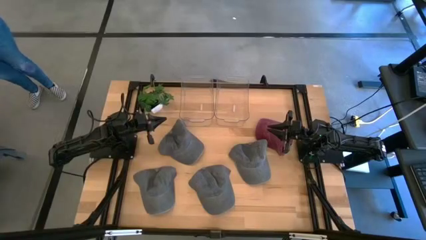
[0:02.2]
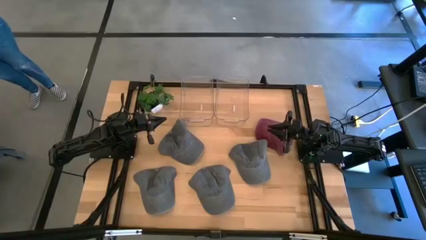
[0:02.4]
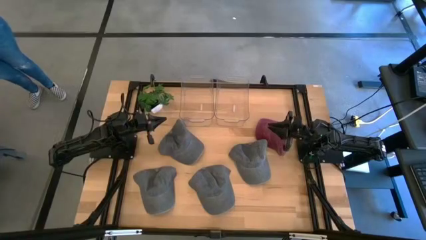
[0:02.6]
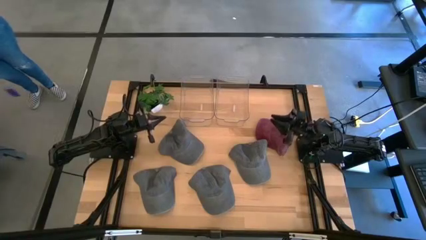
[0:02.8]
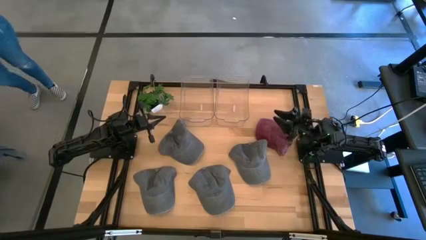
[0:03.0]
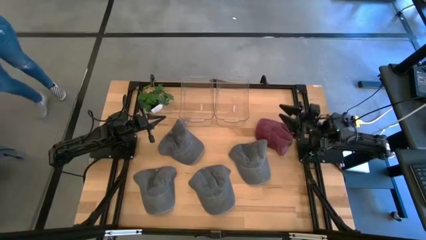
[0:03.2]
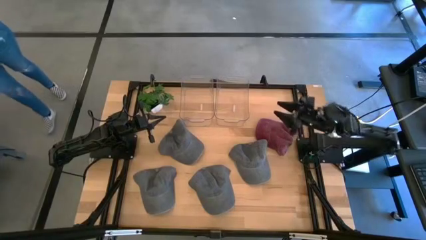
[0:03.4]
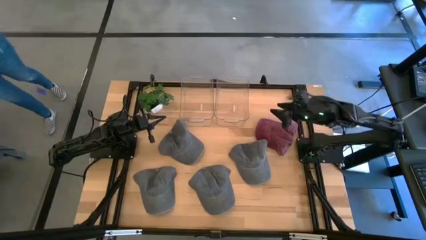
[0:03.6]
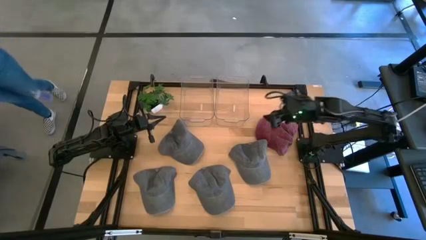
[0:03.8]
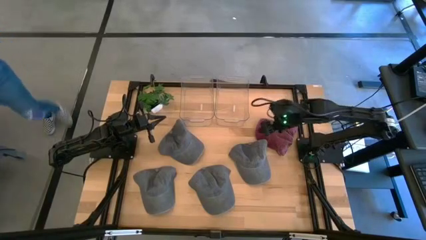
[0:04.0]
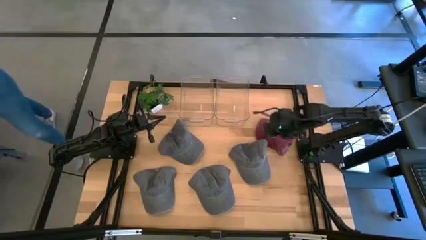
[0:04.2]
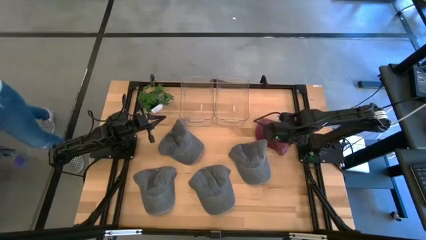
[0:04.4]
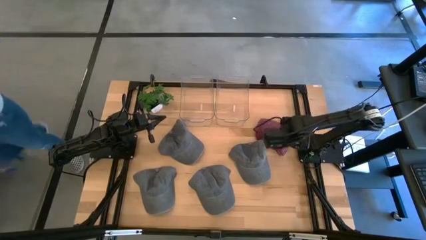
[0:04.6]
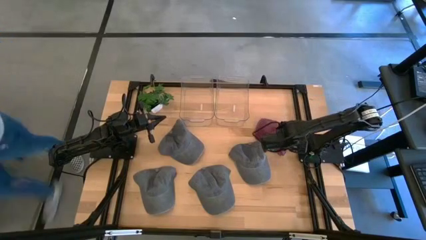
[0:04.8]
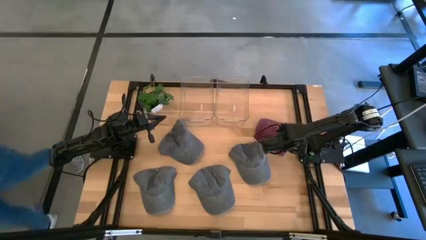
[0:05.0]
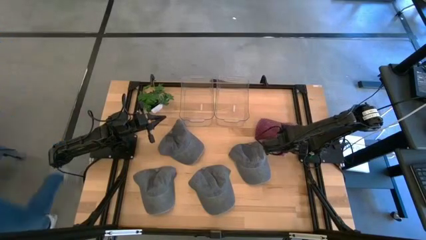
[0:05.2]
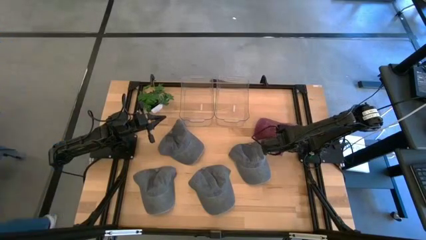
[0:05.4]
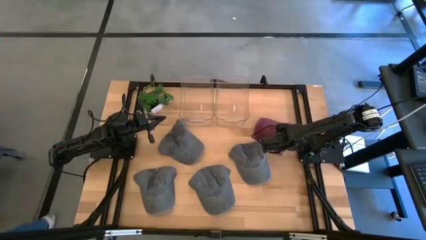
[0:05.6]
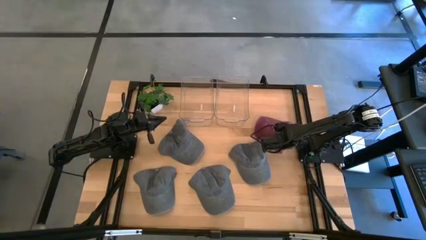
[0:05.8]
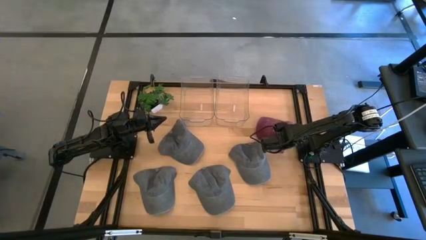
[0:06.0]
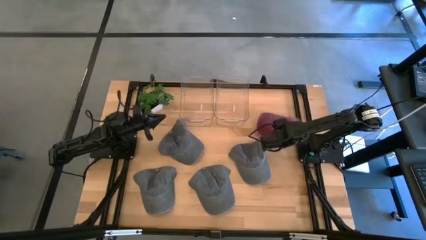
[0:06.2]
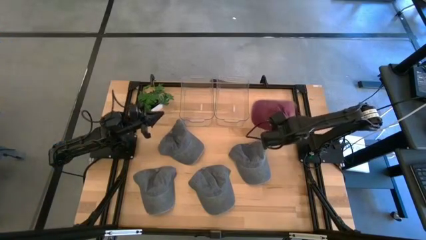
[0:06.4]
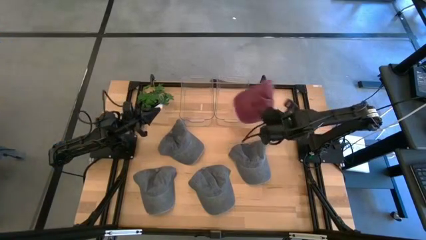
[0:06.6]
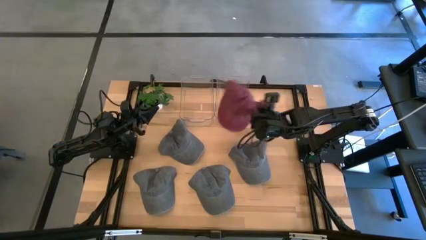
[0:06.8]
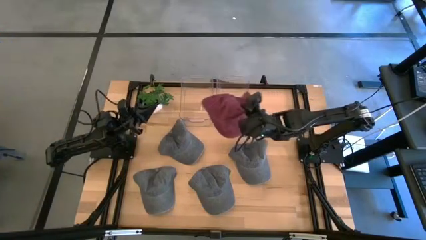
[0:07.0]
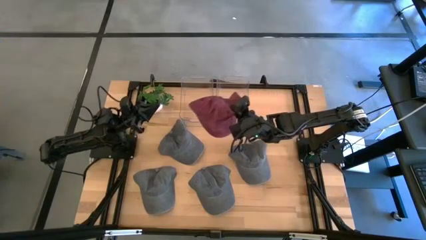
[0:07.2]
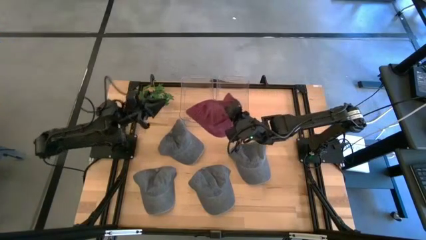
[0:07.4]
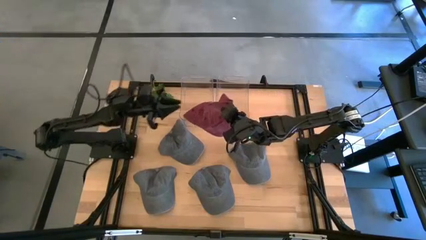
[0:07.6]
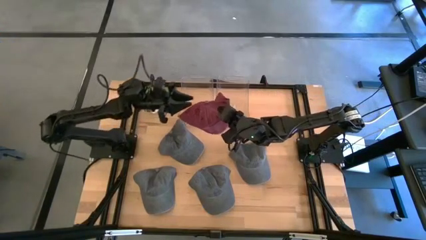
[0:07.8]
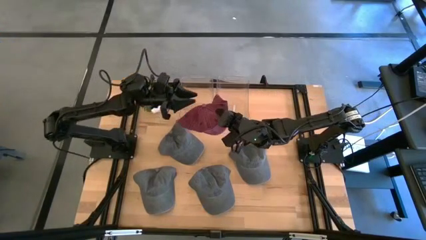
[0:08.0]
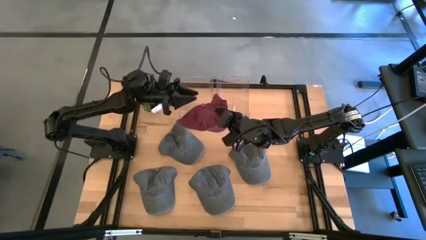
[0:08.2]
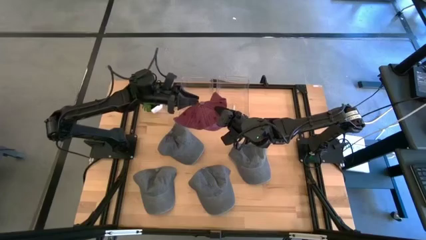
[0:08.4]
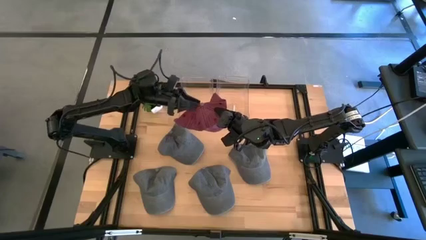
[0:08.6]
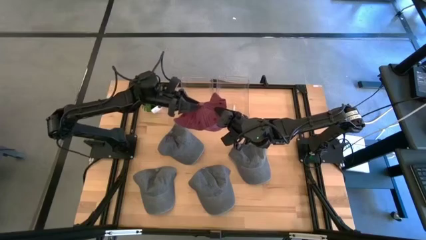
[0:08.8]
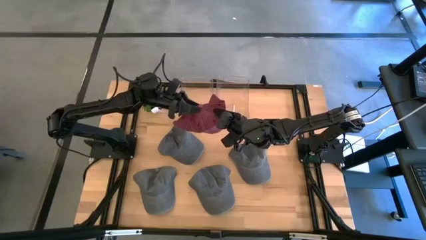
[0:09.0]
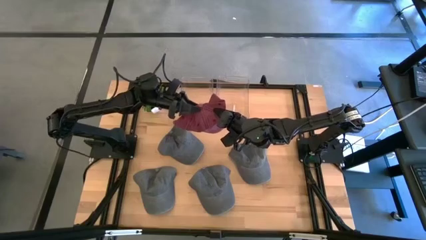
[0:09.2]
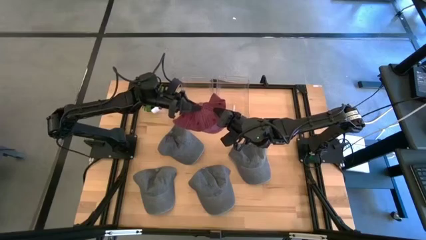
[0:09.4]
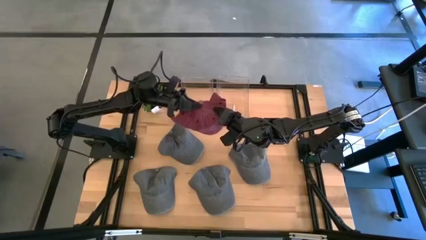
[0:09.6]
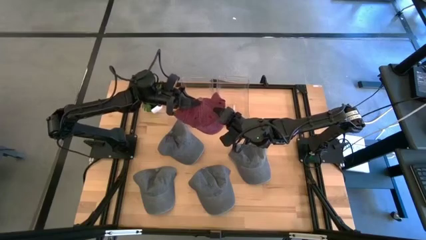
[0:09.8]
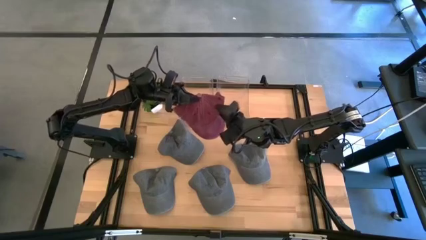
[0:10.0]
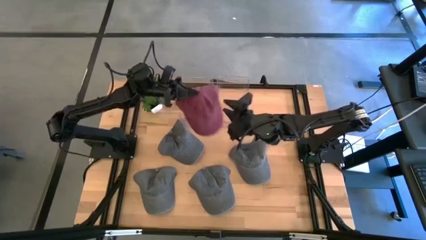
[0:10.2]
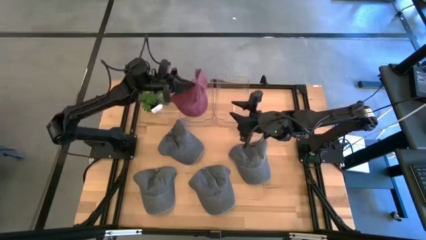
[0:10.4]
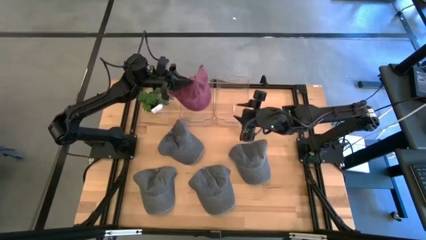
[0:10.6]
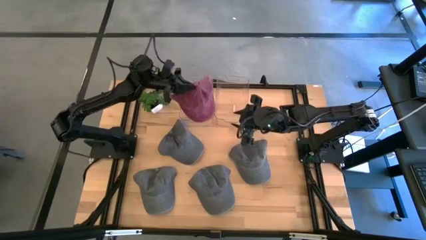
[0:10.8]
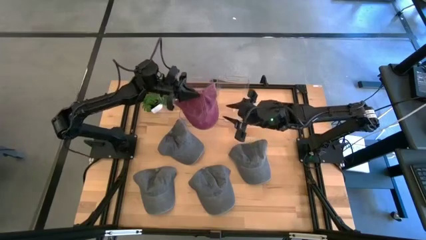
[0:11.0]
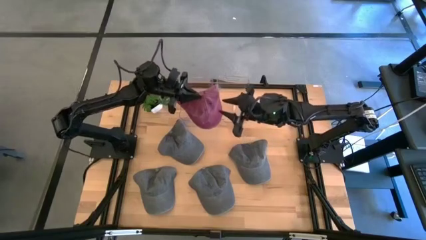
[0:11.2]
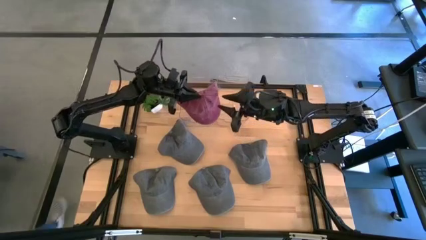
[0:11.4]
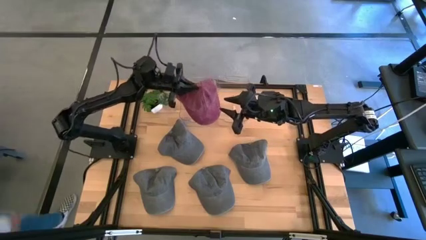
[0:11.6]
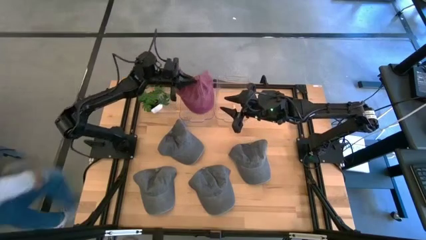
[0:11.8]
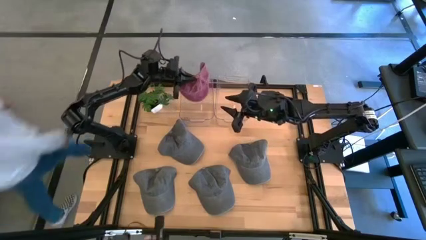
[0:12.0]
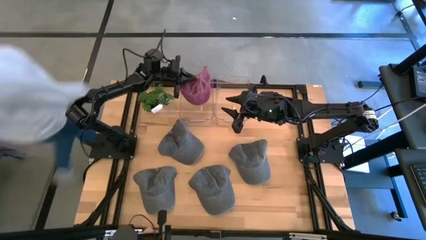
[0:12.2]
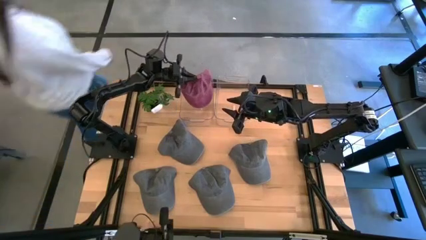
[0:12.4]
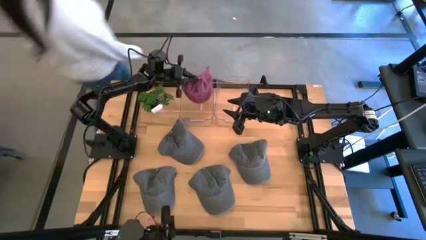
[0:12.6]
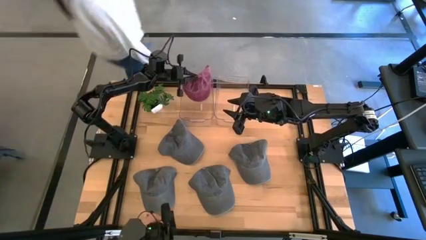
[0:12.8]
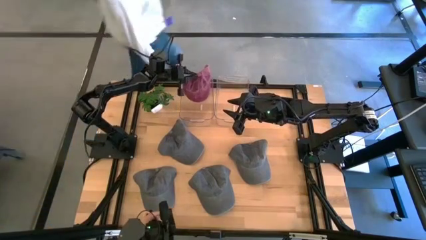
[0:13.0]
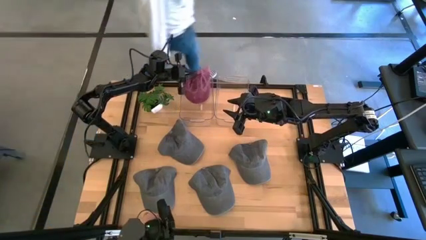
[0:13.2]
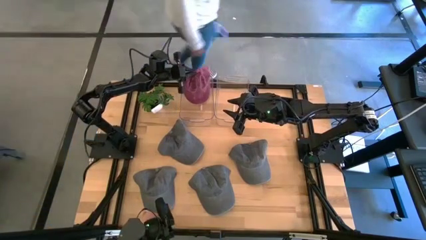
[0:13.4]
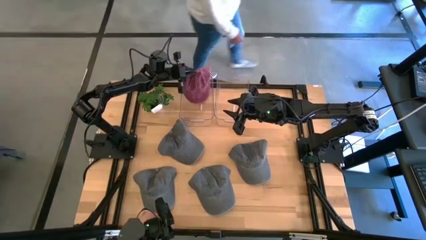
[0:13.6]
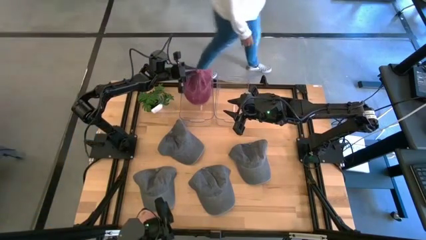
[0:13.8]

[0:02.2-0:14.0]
Task: Pick & Place hat
Put the red cap into the left transparent bin
